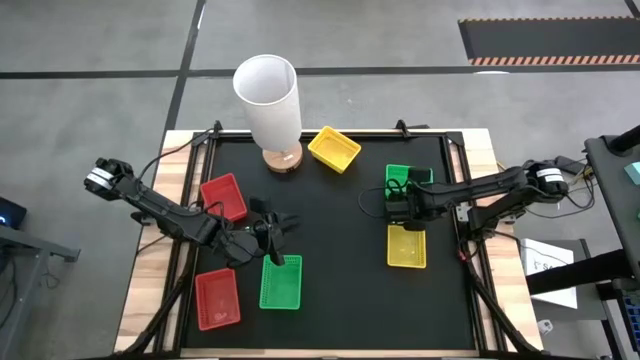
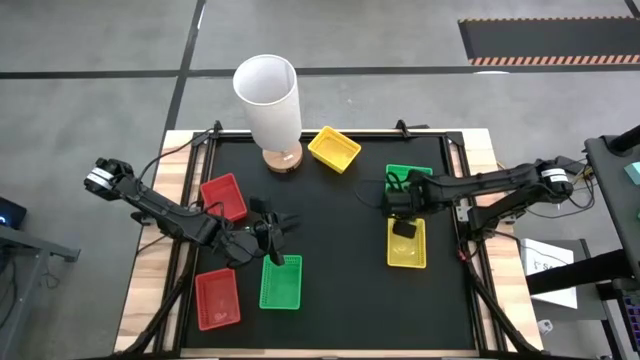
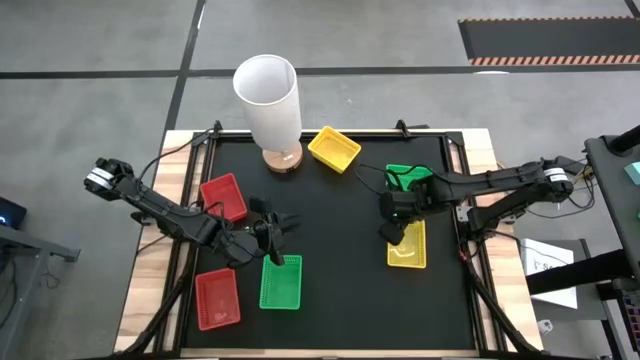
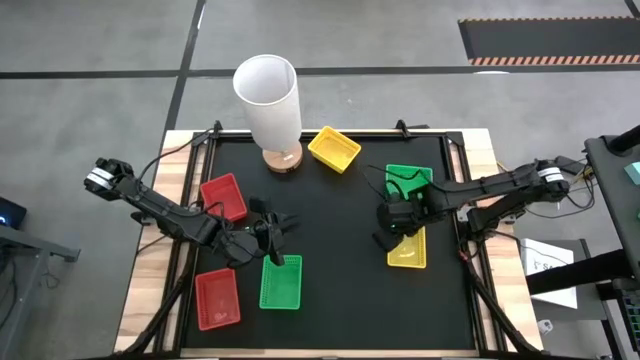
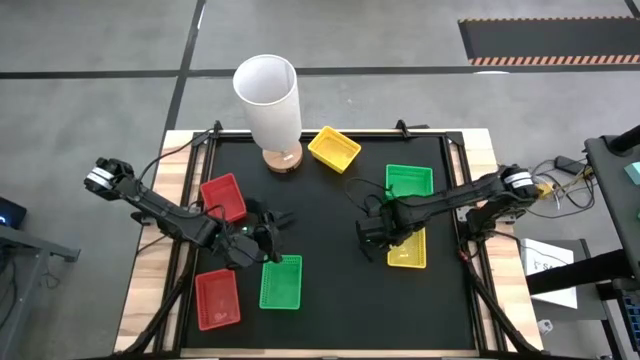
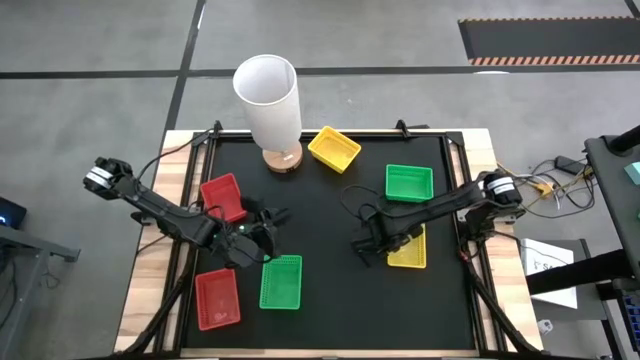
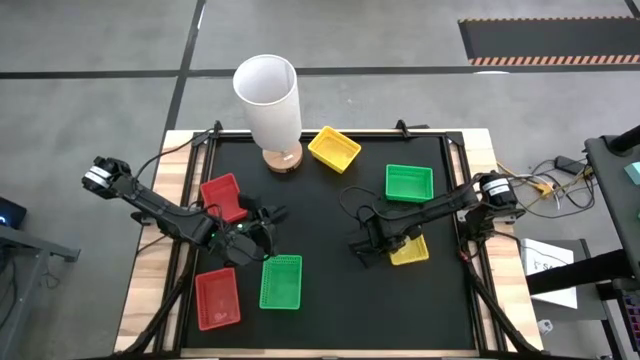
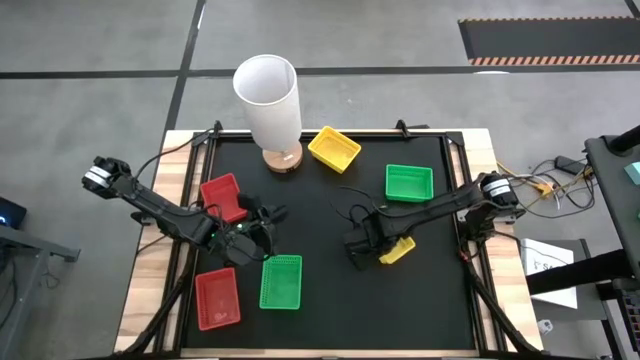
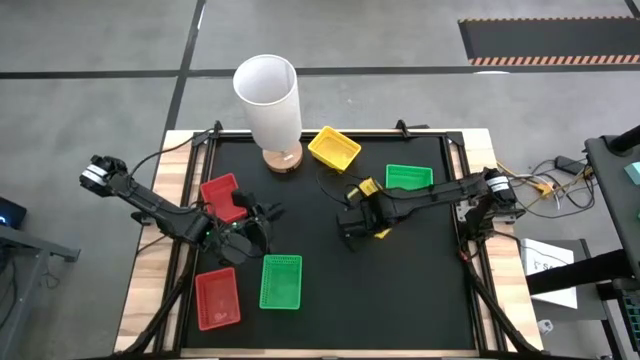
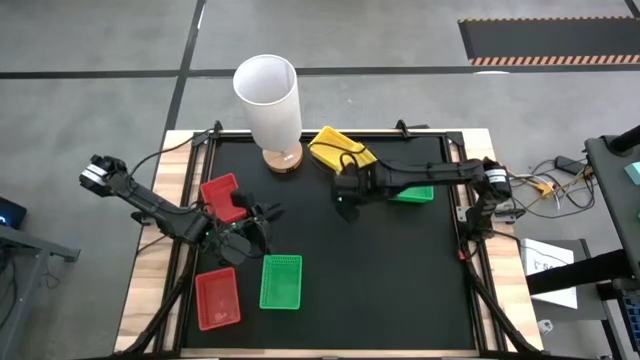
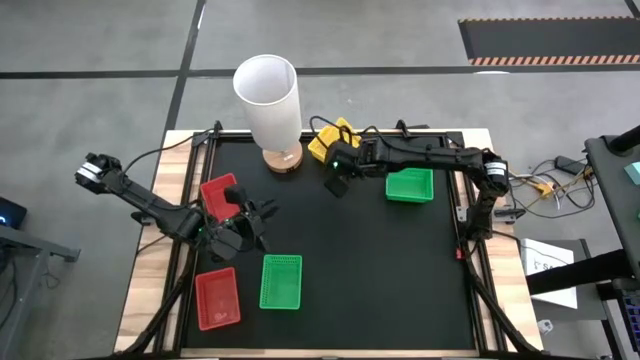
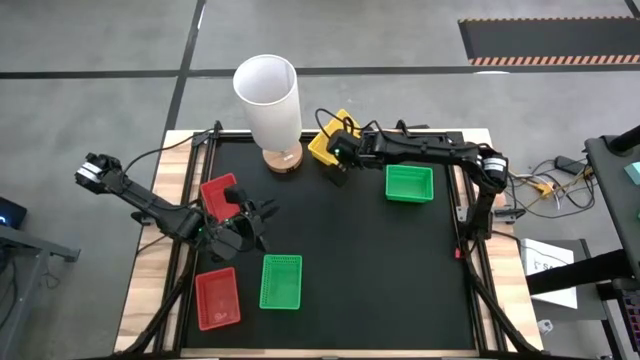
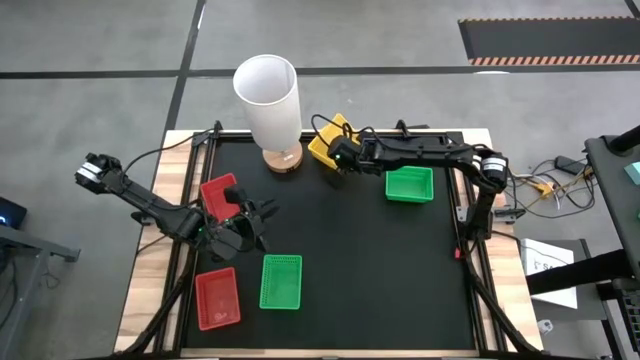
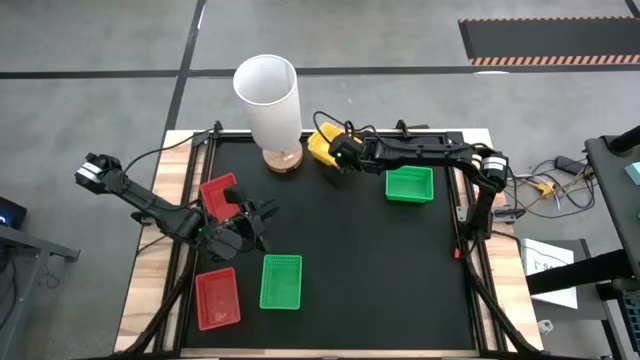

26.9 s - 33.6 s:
Stack the bottom yellow bin on the stacked yellow bins

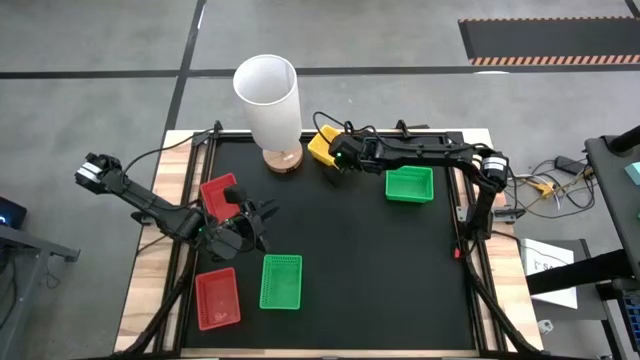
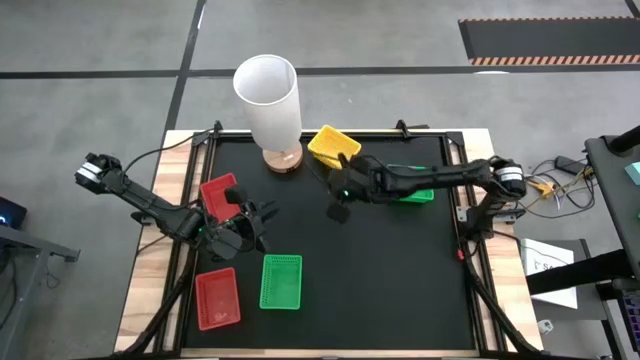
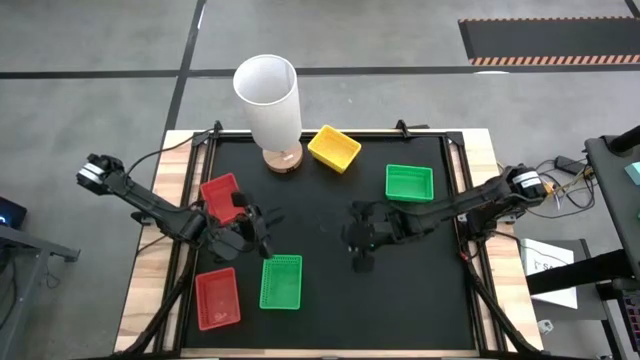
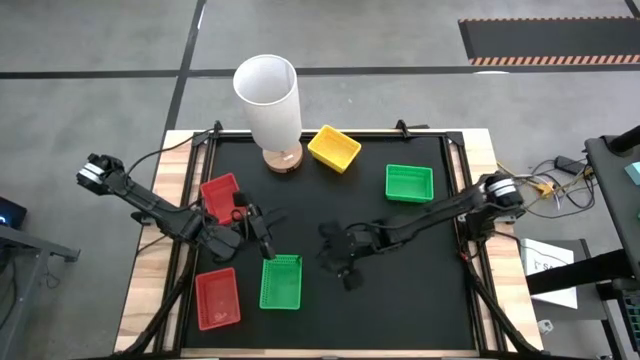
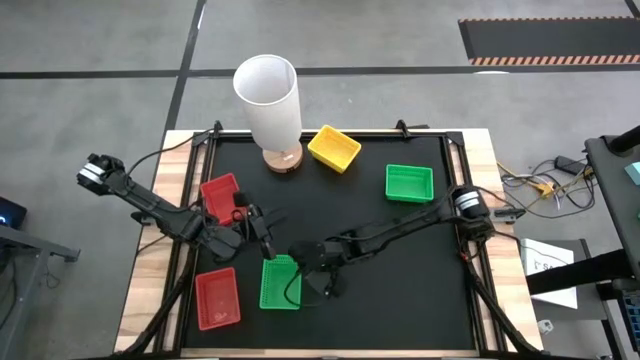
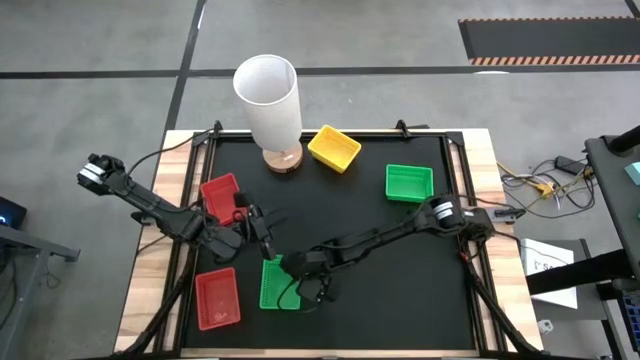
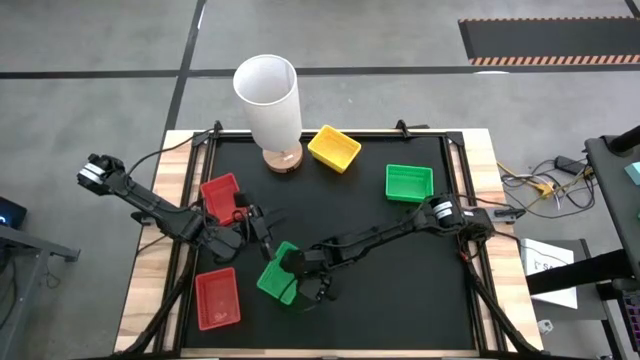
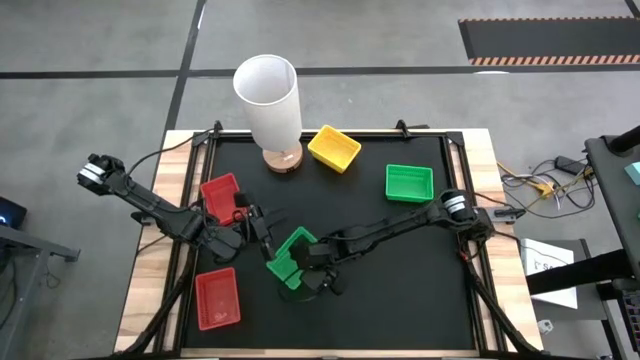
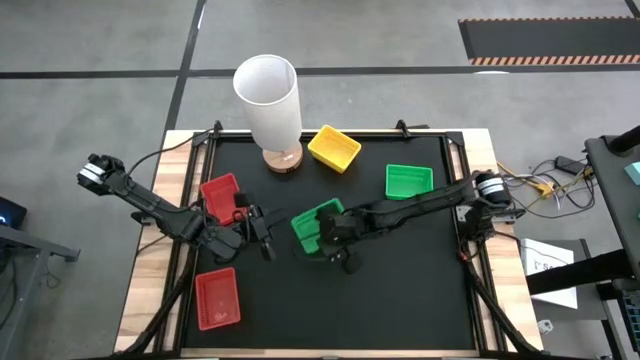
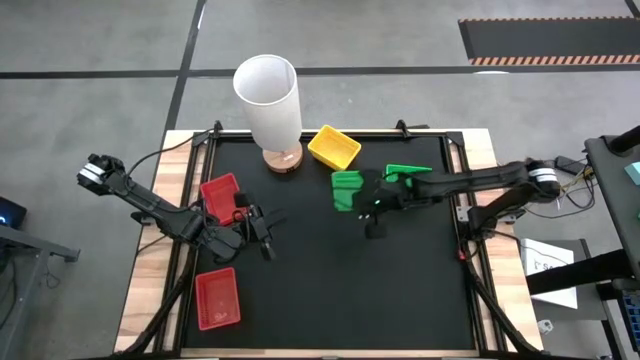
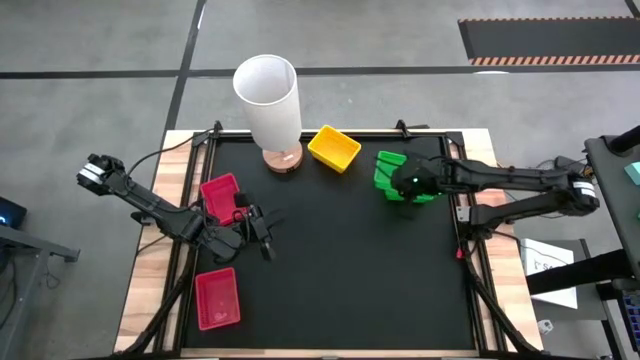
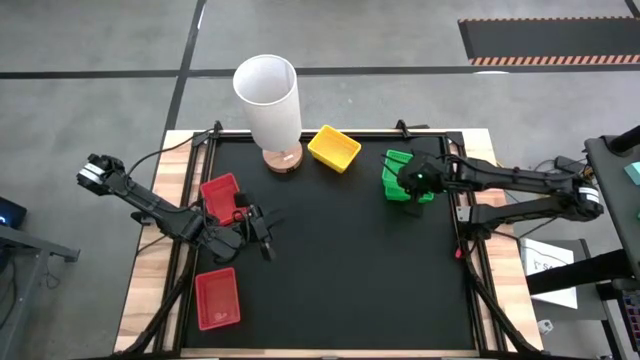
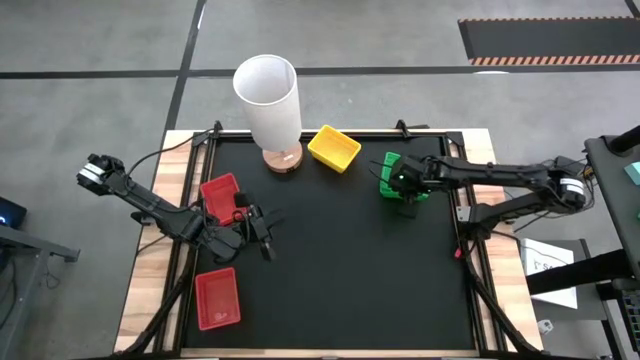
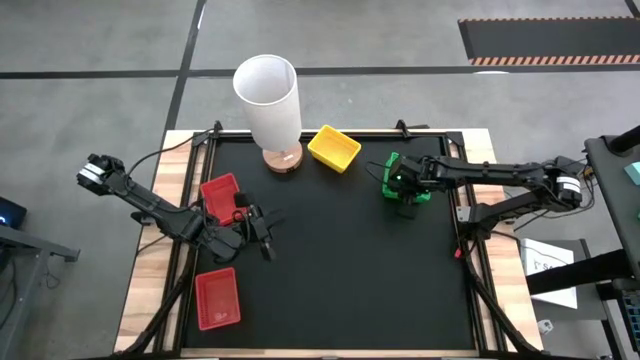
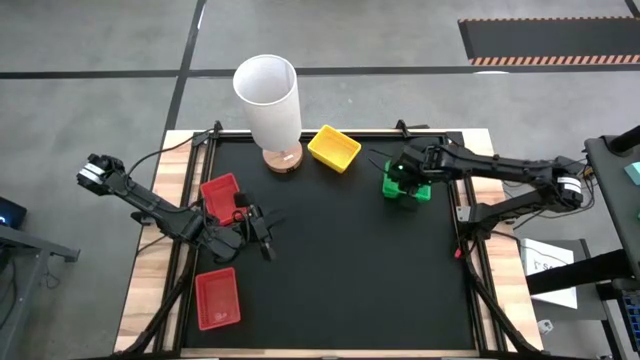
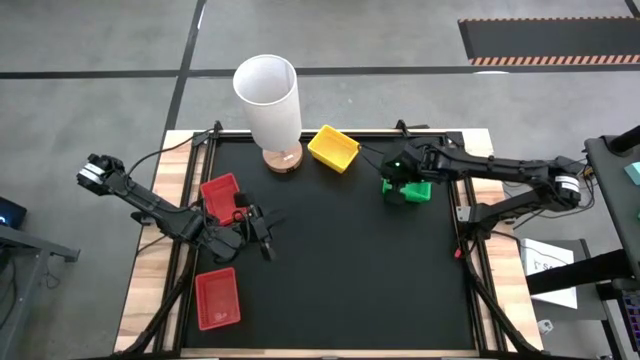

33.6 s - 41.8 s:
Stack the bottom green bin on the stacked green bins

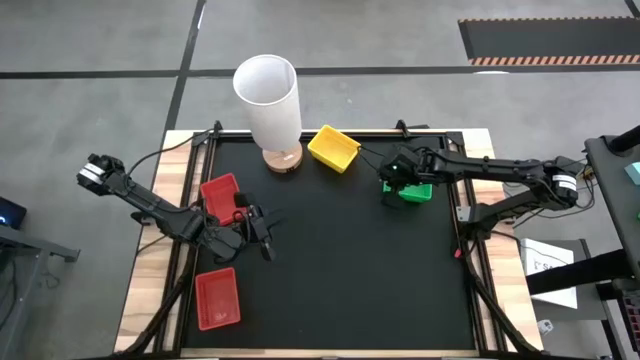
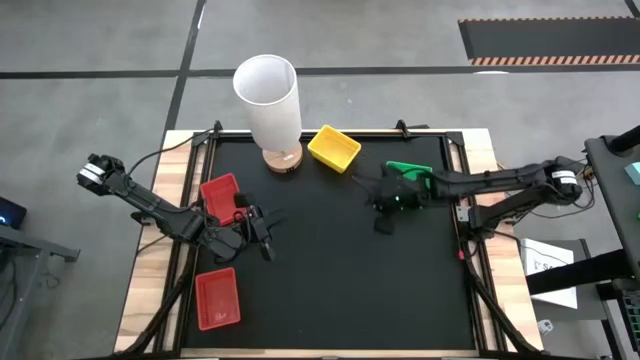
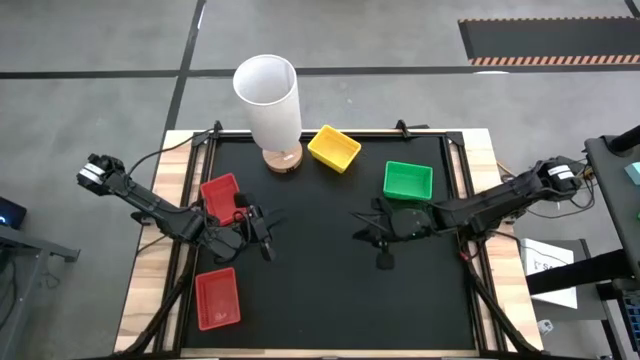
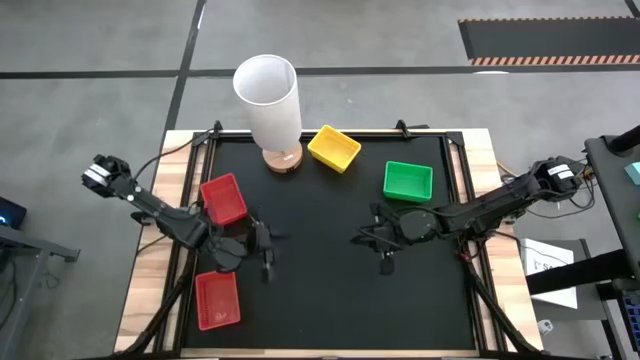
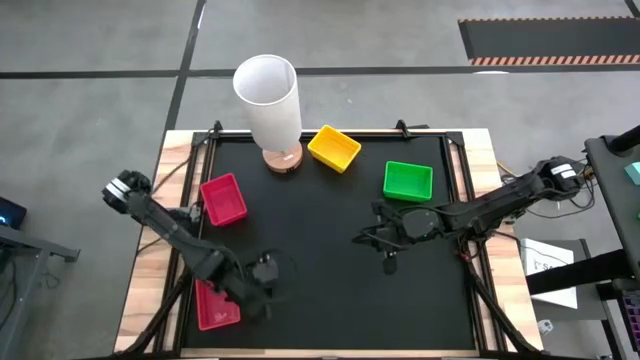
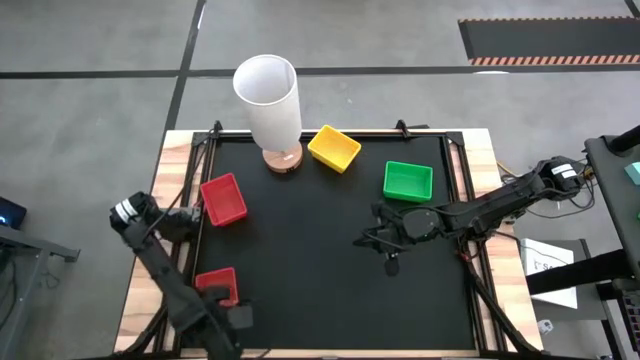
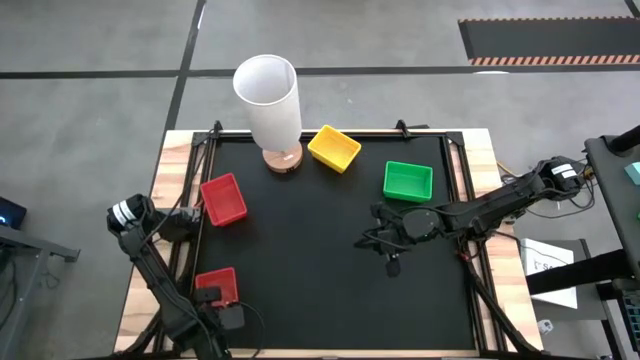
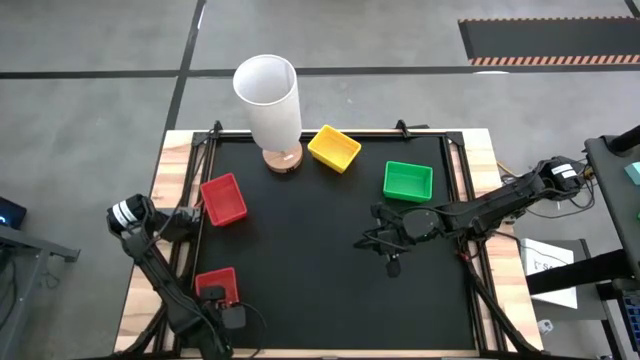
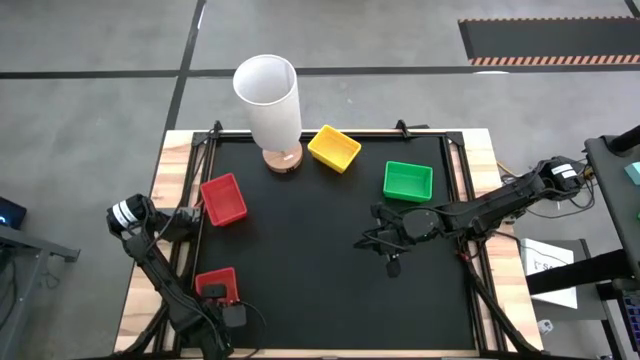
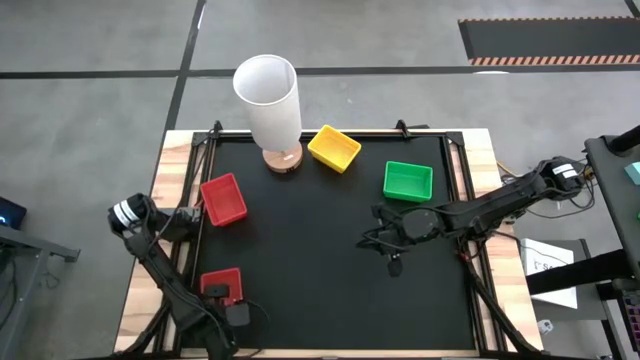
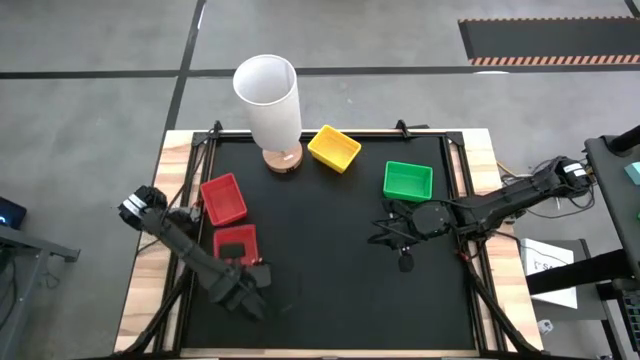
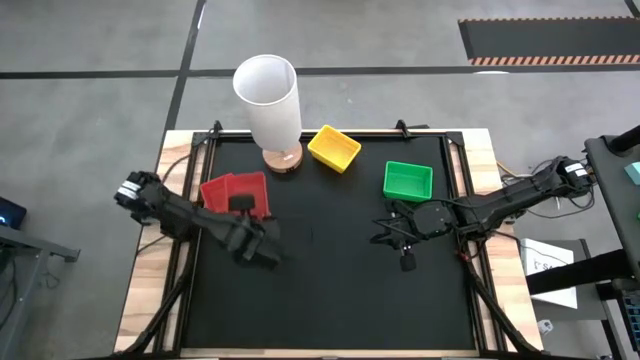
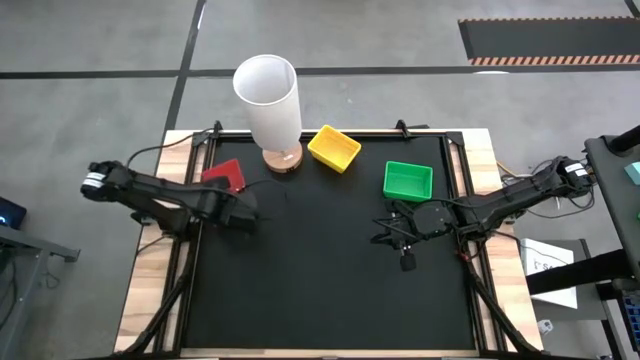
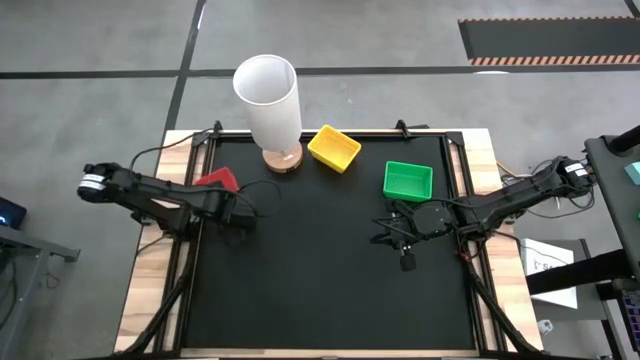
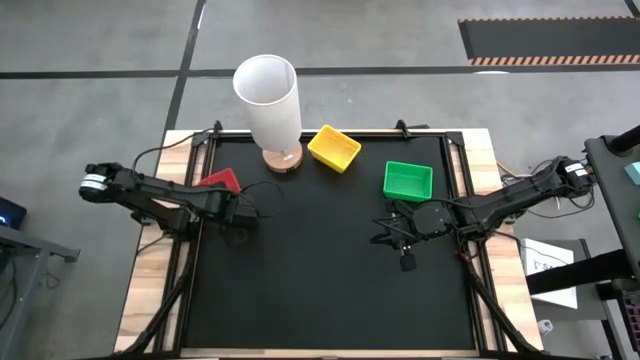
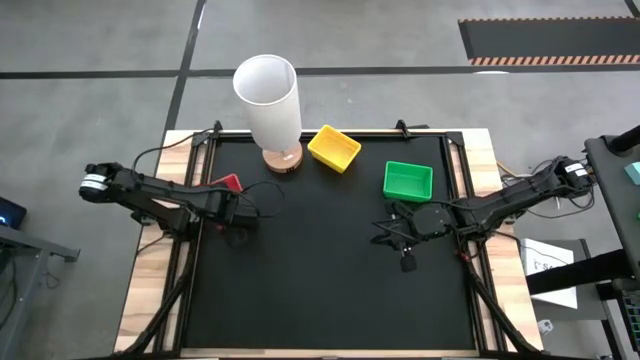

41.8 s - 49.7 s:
Stack the bottom red bin on the stacked red bins
